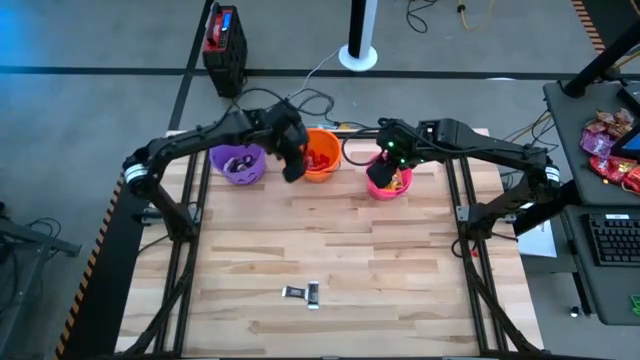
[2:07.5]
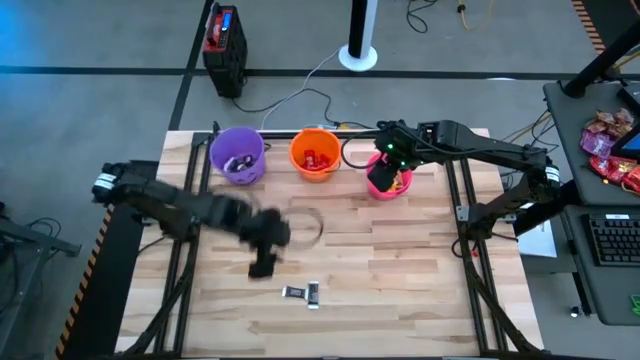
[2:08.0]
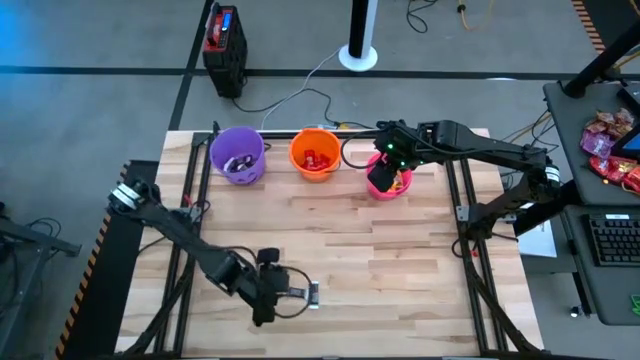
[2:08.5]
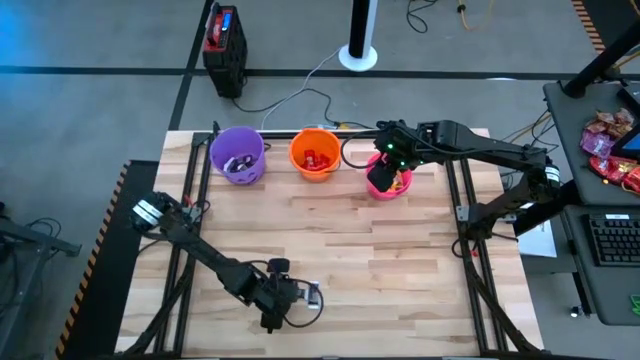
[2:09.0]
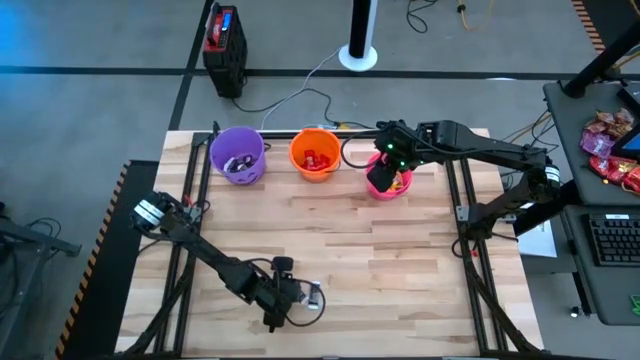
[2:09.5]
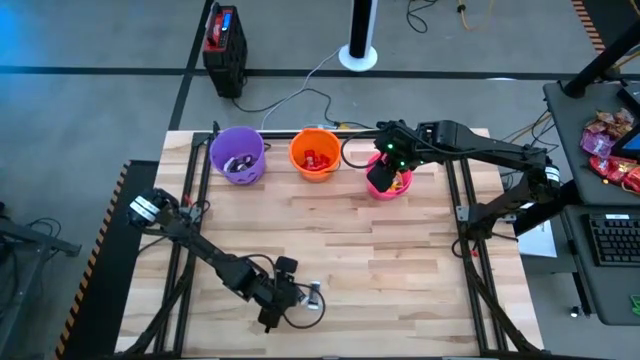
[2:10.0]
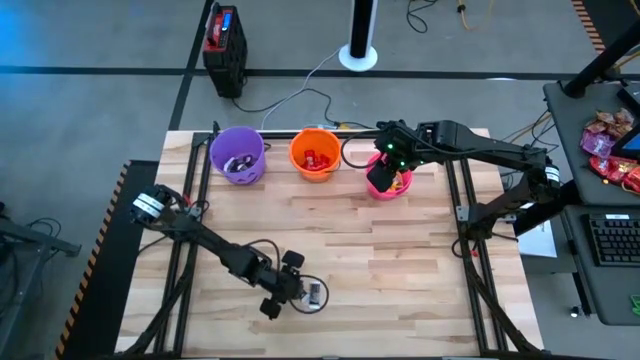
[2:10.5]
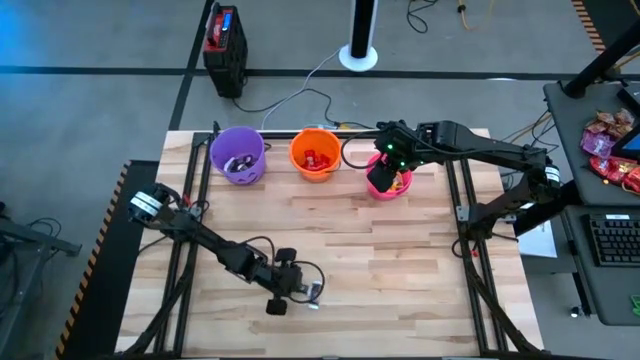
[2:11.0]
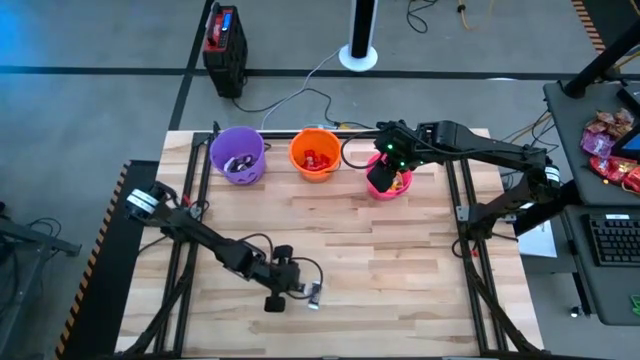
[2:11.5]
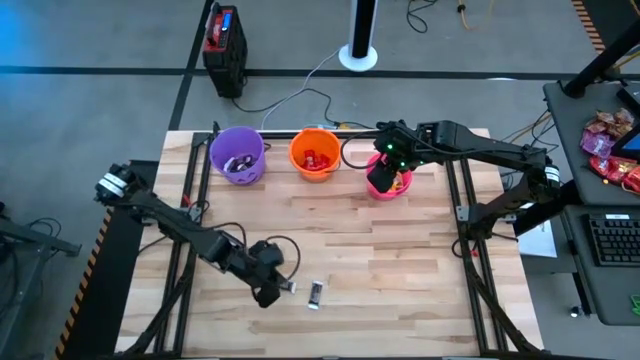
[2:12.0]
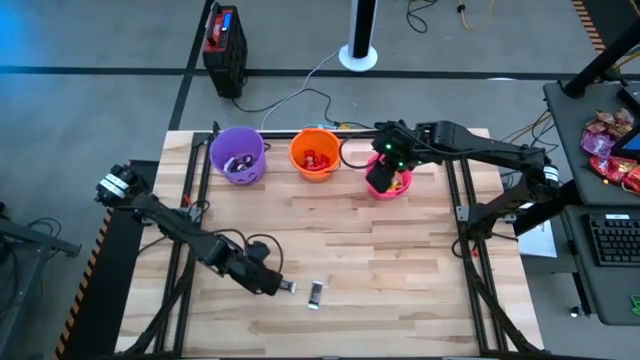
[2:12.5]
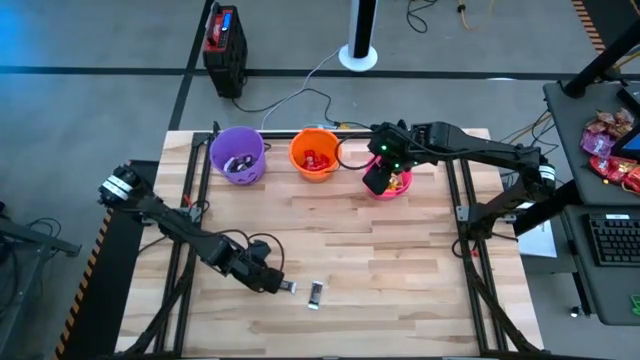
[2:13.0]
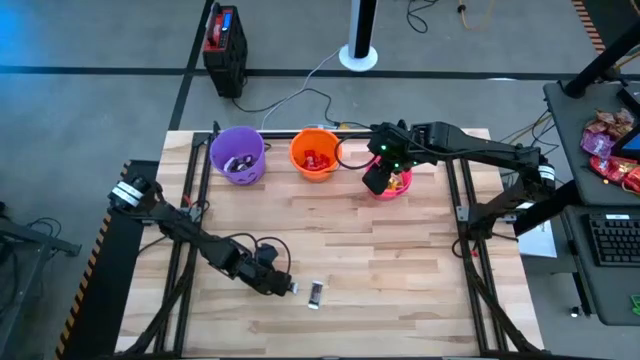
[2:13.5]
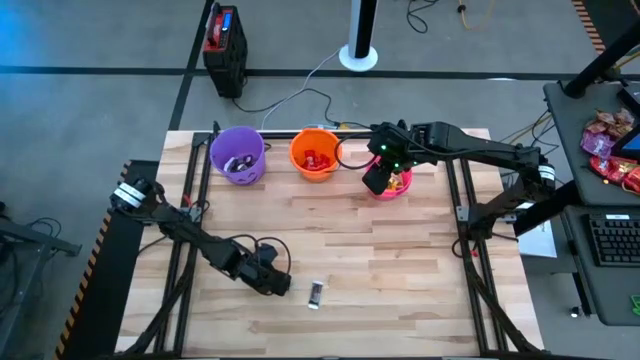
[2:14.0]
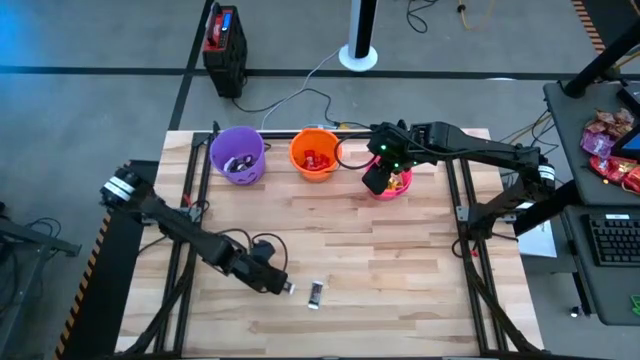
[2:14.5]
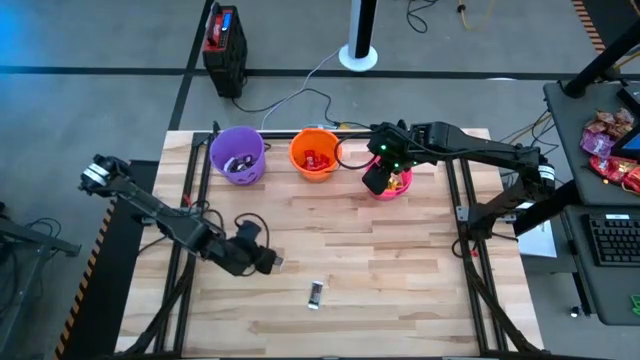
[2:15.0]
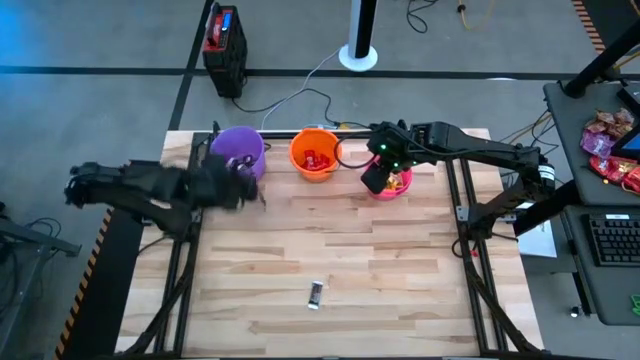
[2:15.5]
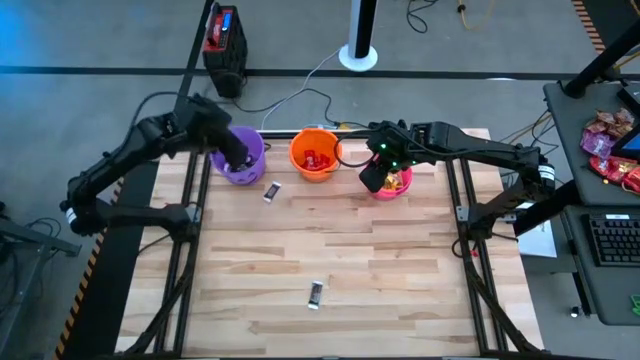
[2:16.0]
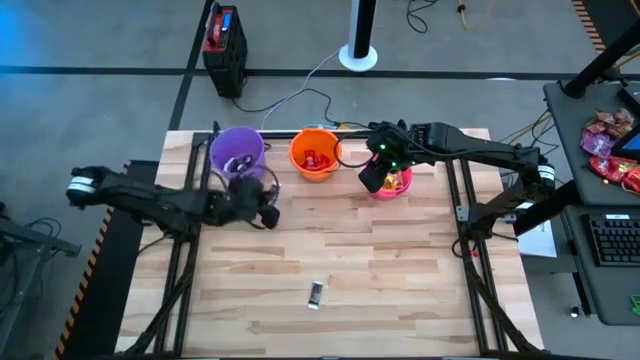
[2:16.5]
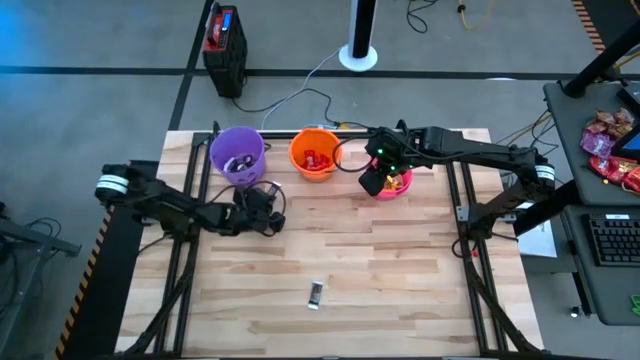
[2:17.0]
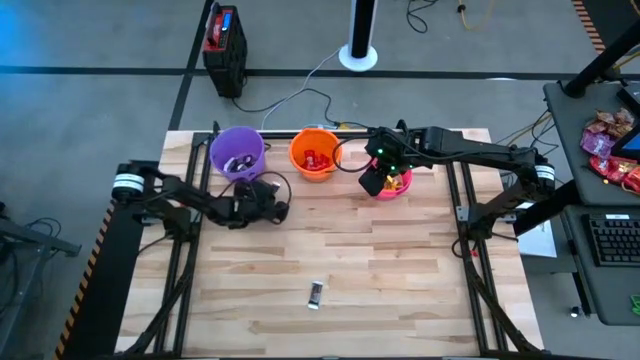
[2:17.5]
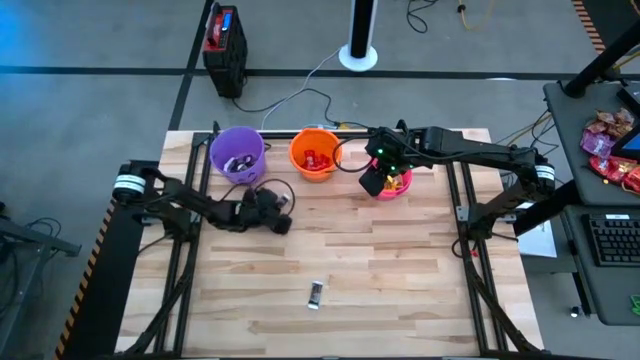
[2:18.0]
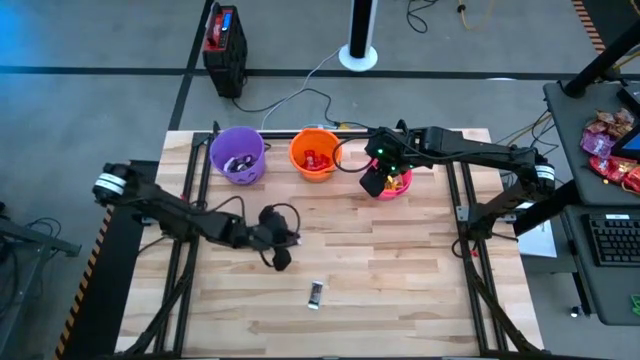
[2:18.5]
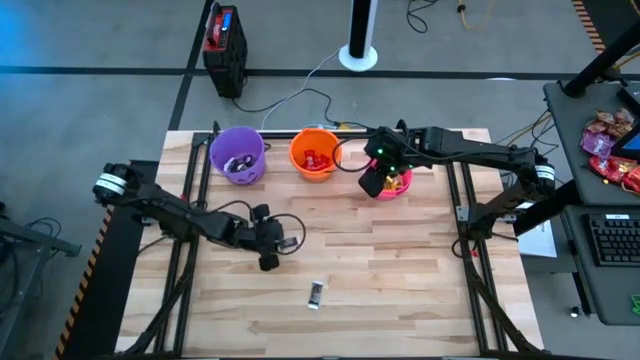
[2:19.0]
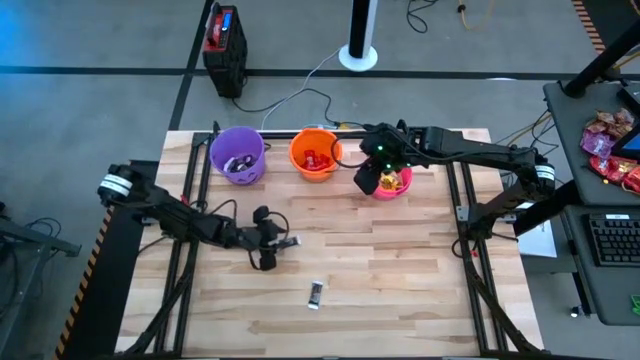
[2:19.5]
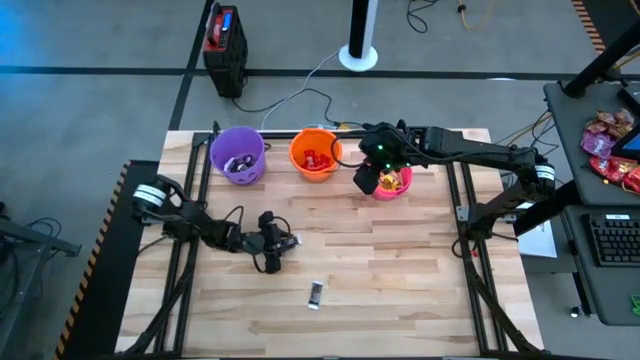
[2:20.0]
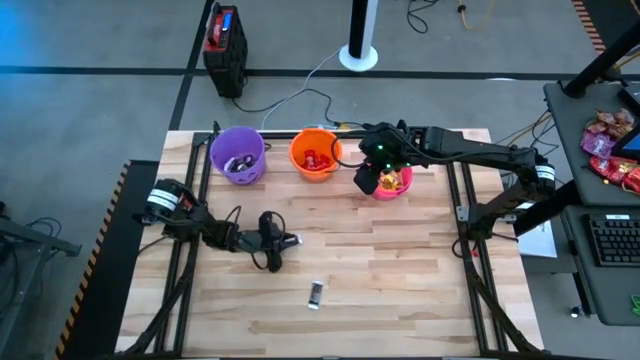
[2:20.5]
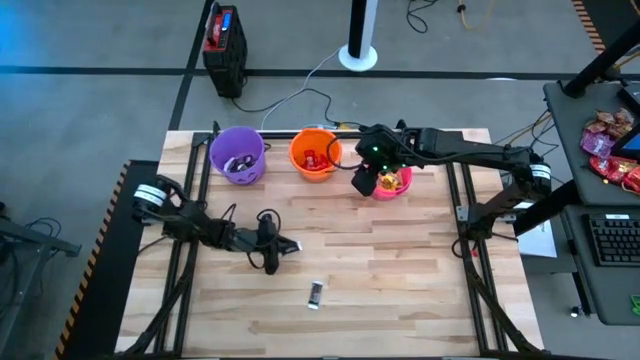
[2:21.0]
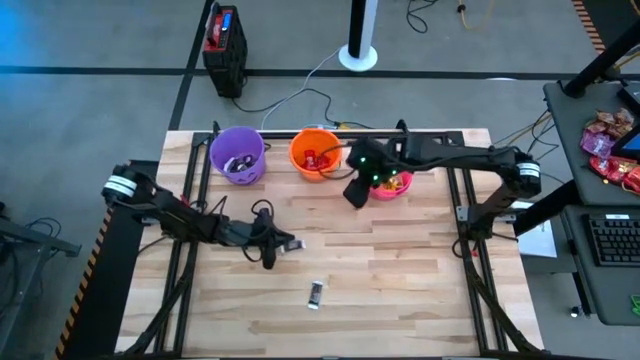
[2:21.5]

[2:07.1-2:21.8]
Task: Sort candy by brand, put in halloween buckets
Put the black candy into the violet bucket

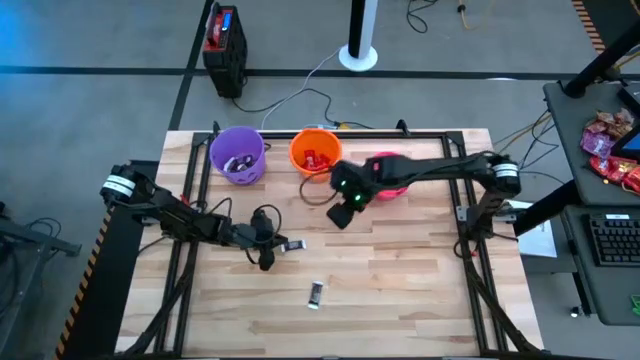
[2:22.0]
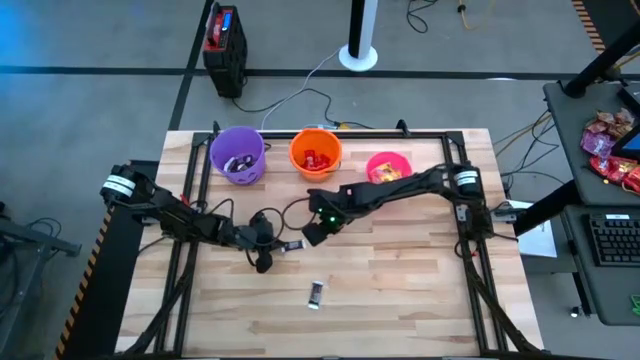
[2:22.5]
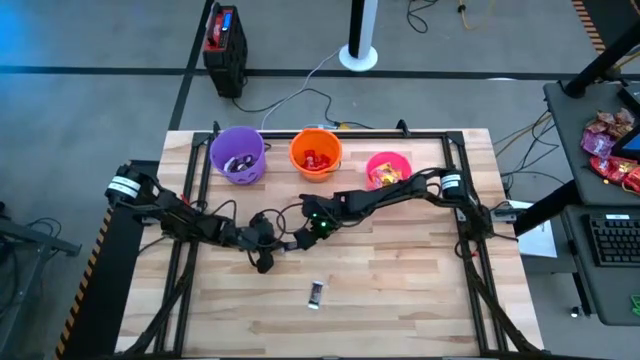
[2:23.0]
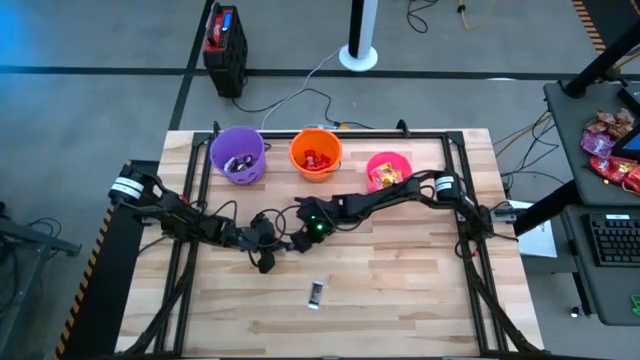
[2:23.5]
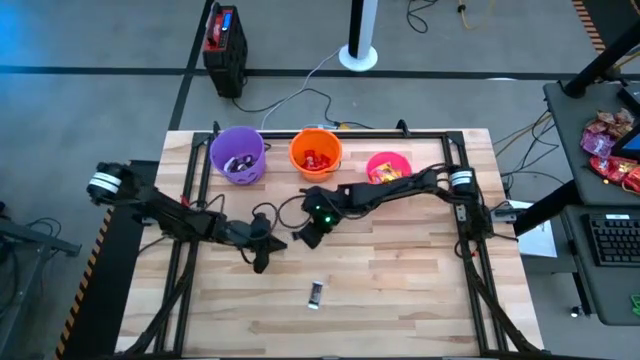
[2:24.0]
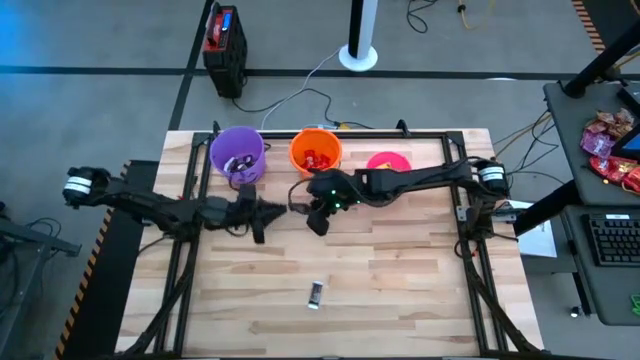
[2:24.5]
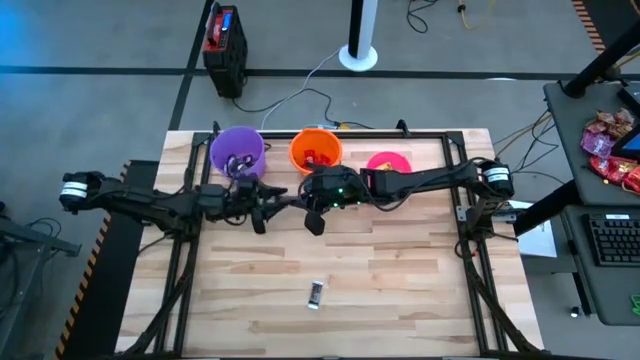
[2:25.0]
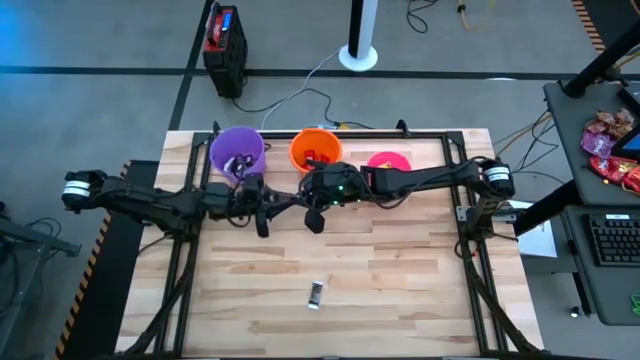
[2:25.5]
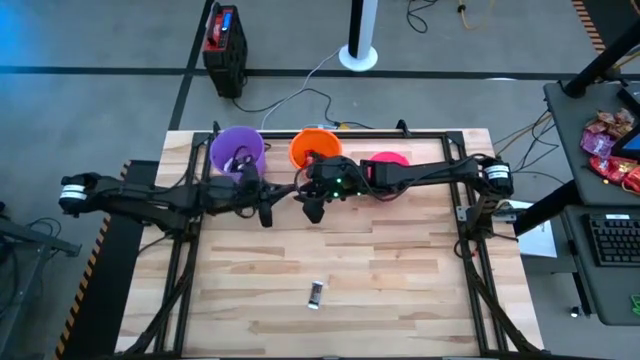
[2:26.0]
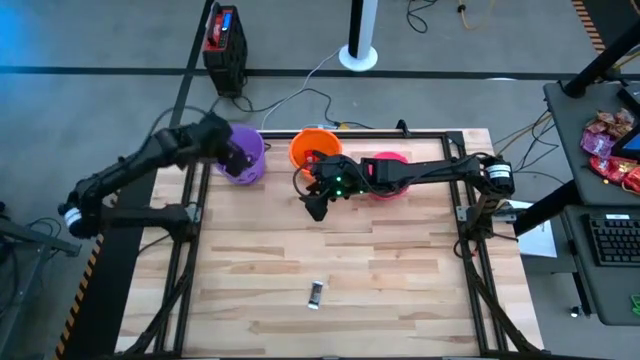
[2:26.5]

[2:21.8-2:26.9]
Put the black candy into the violet bucket

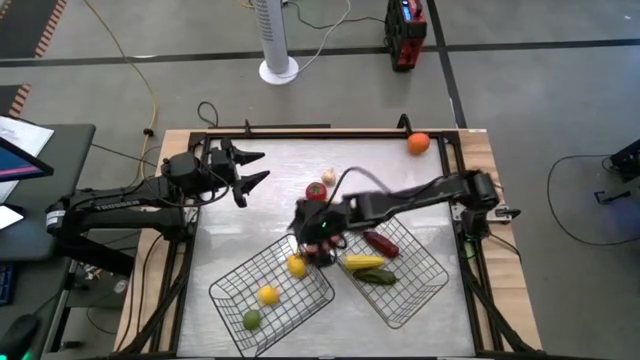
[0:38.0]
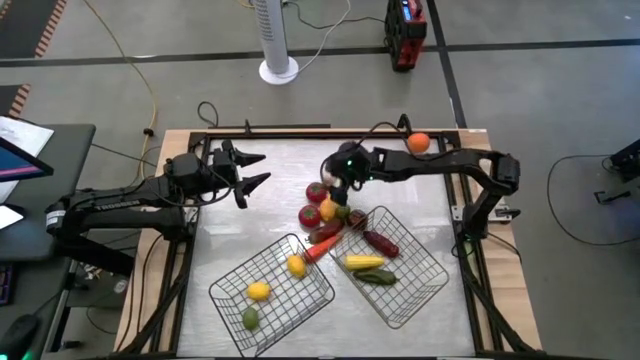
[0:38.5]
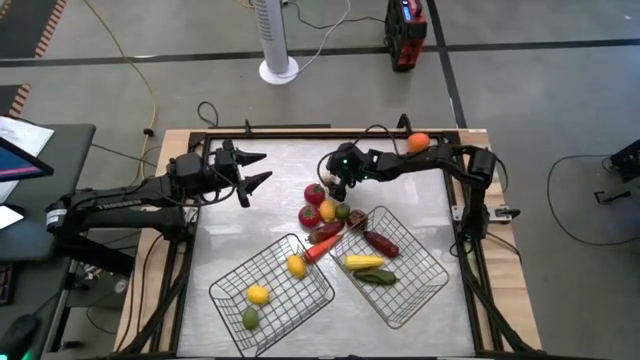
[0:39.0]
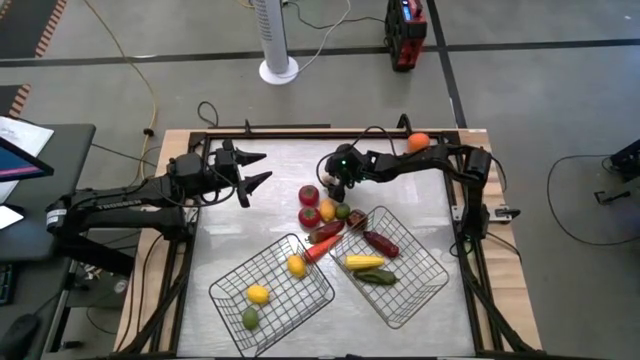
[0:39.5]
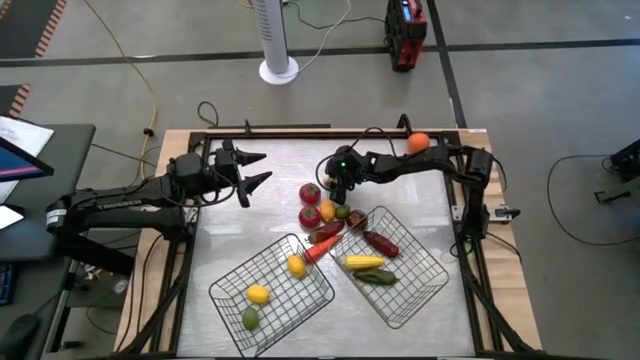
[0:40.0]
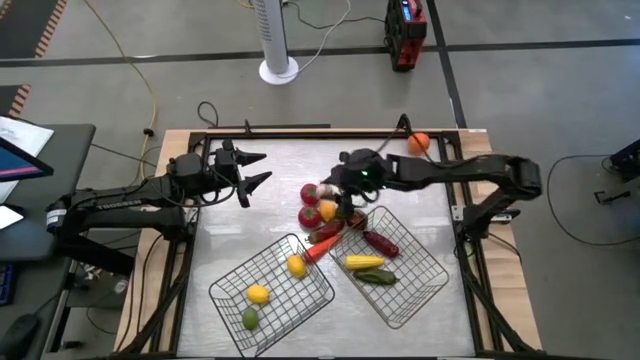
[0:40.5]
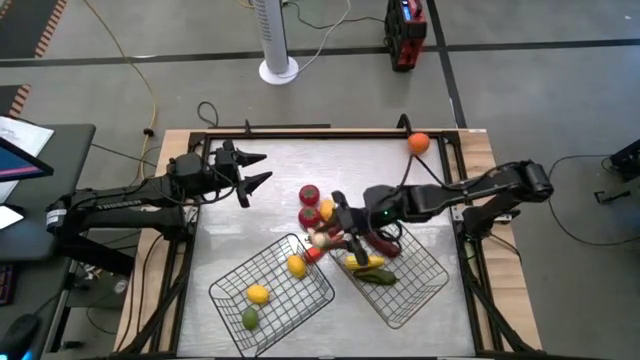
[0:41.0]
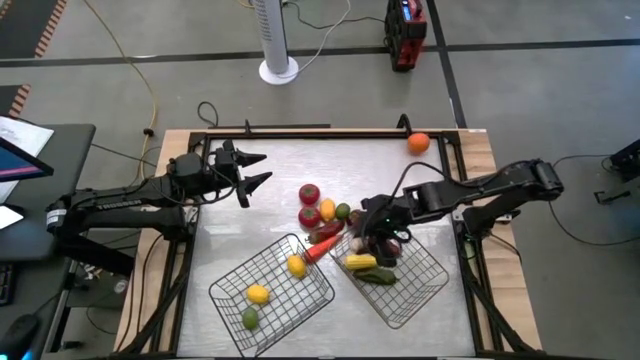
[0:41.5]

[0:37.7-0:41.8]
Task: Sort produce into baskets
Put the white garlic into the gold wire basket
